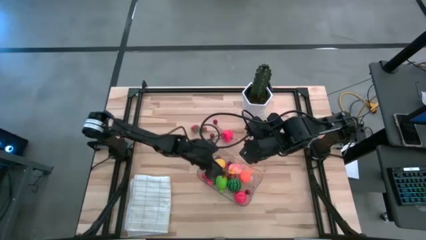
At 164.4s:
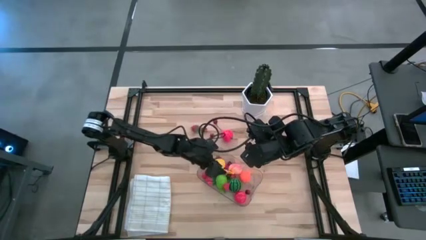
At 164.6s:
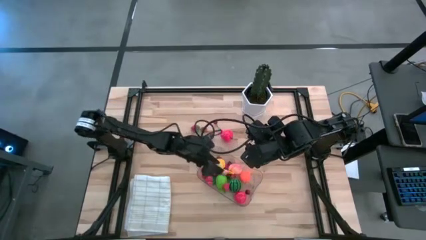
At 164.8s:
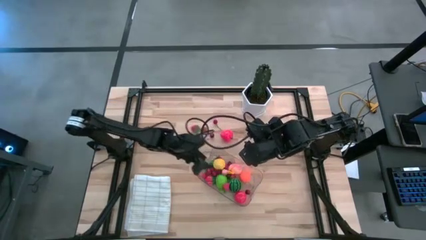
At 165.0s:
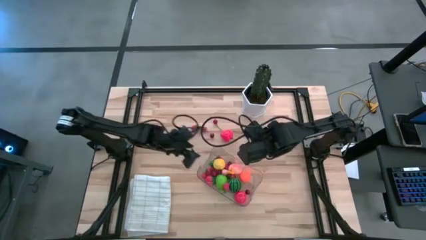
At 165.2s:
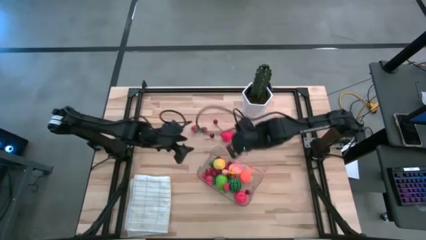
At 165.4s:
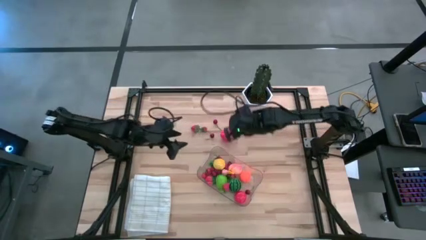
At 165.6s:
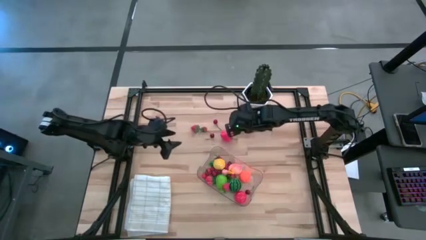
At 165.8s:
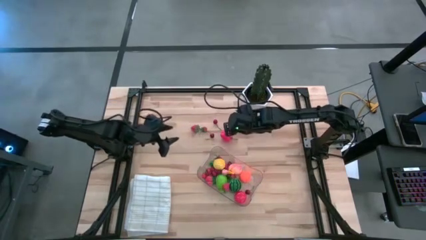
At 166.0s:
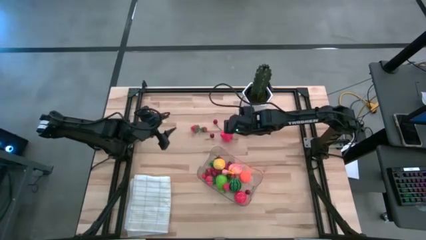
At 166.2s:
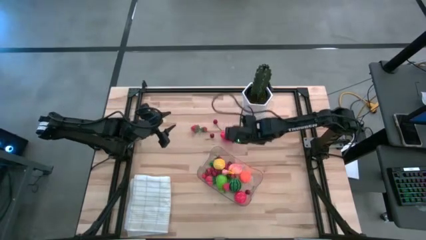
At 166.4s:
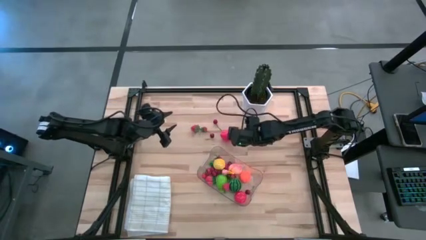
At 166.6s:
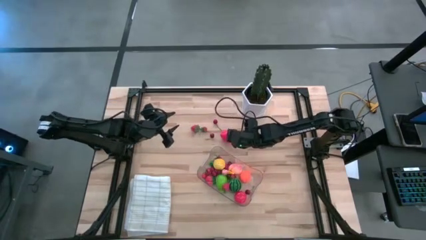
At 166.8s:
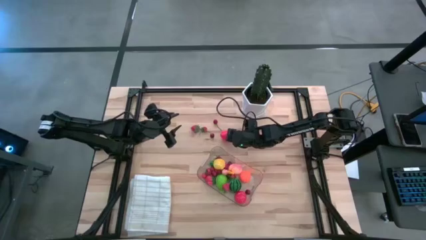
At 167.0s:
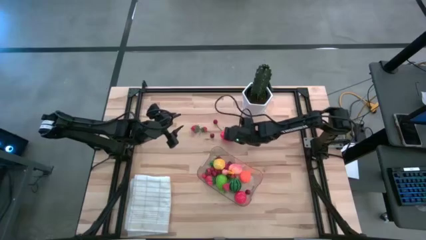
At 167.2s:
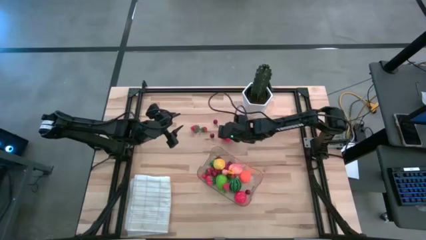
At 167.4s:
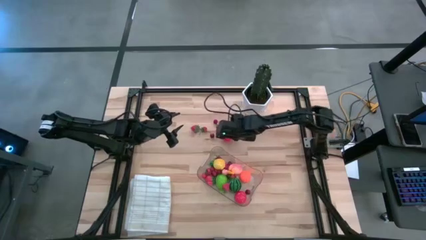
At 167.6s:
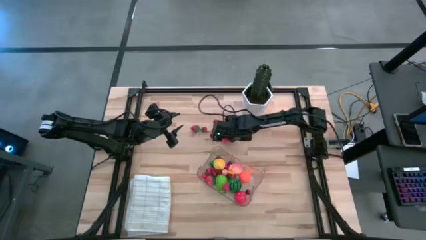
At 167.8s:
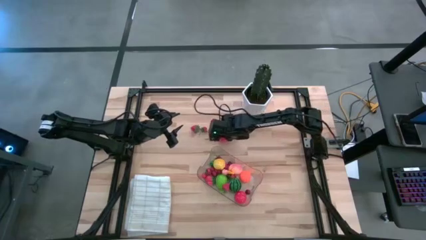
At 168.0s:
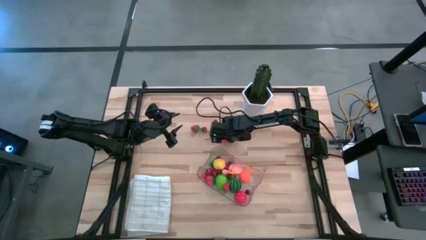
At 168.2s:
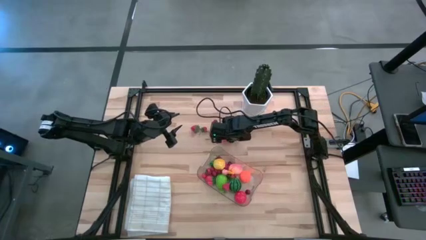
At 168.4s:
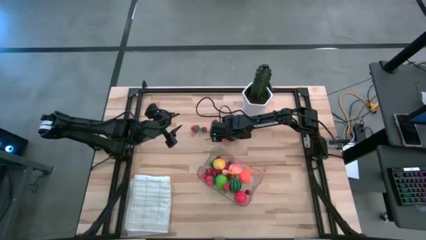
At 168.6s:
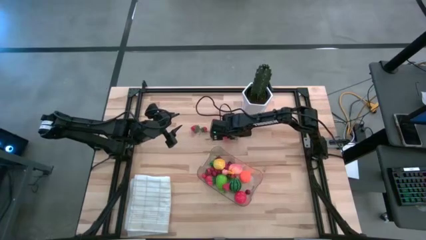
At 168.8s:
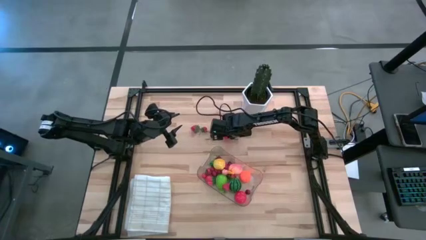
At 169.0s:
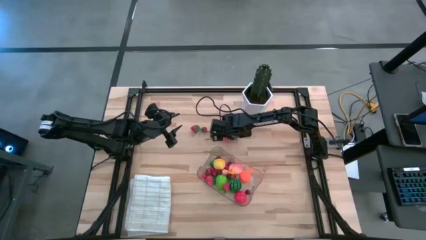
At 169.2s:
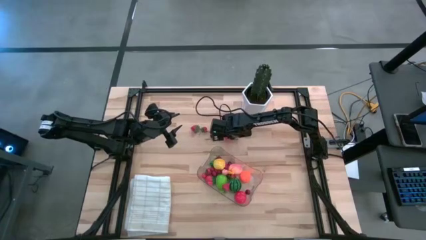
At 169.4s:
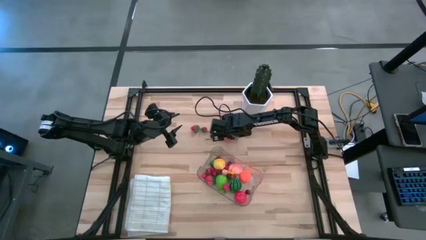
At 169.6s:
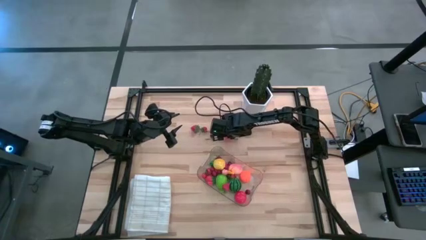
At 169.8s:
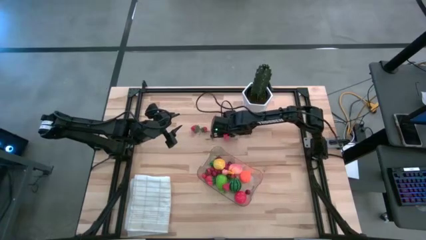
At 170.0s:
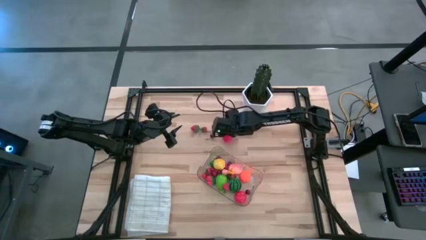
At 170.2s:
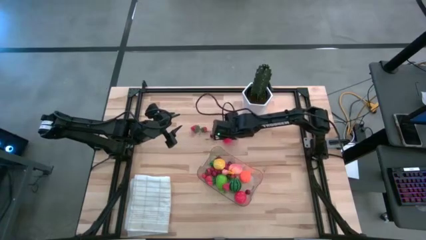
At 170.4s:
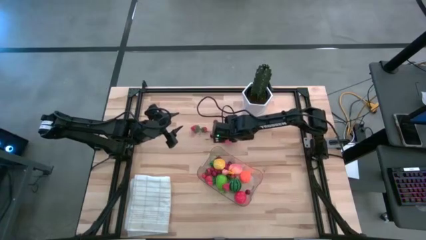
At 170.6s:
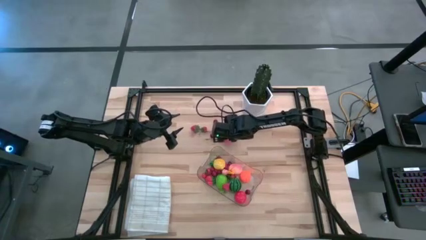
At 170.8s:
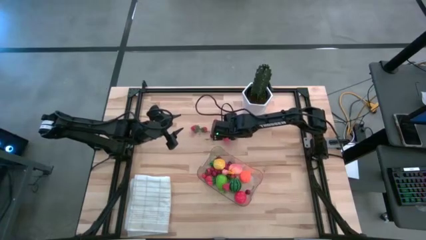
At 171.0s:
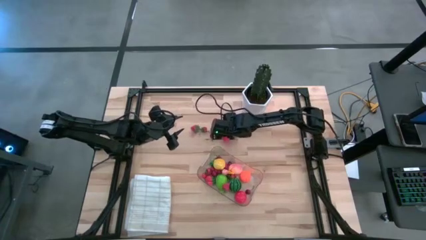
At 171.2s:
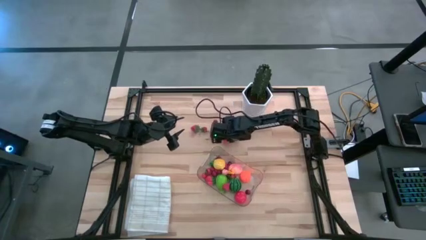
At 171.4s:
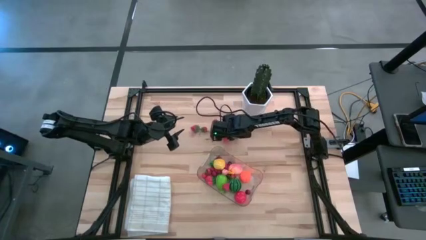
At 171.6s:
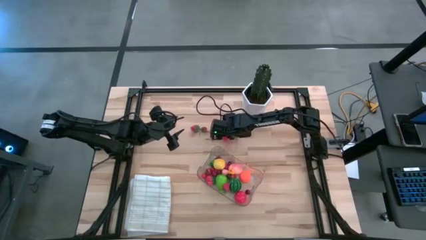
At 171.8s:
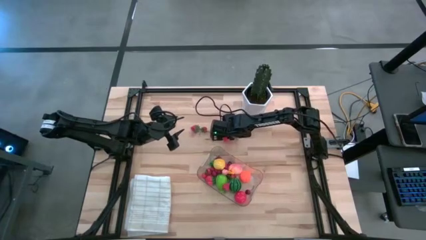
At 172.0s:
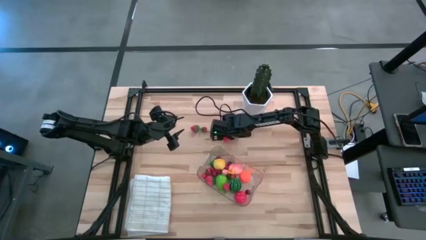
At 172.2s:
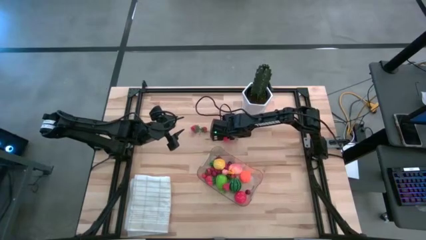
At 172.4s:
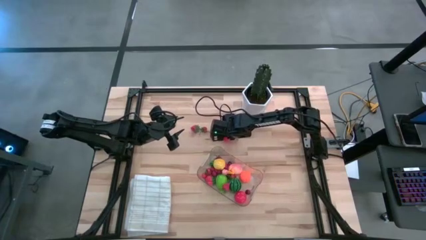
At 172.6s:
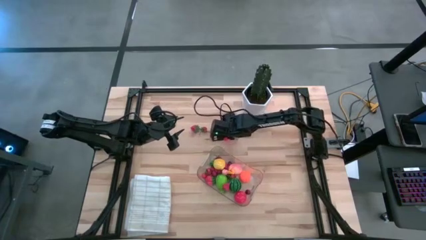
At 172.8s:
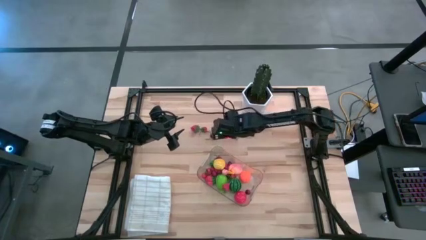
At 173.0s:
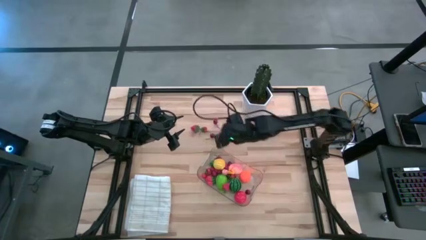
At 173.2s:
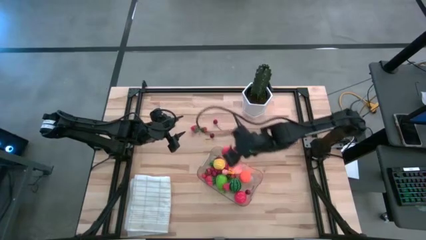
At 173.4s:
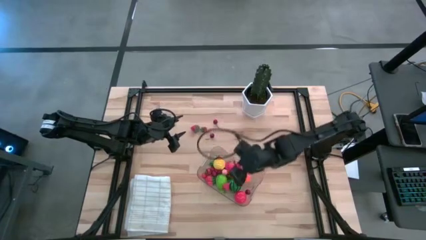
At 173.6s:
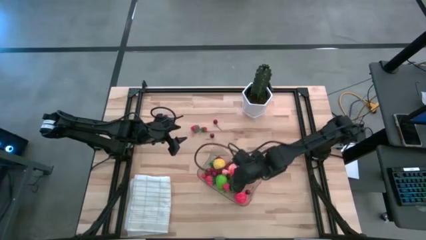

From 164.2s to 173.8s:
Task: Pick and placing Produce into tupperware
Put the red apple into the transparent bin

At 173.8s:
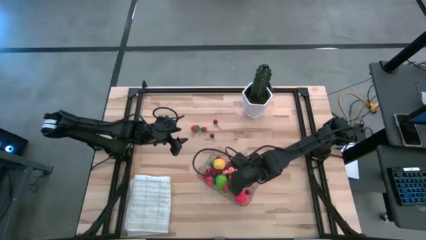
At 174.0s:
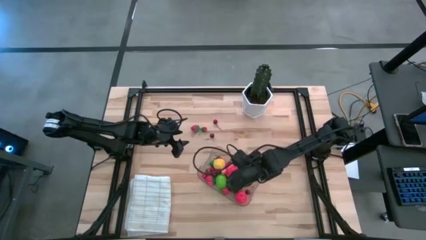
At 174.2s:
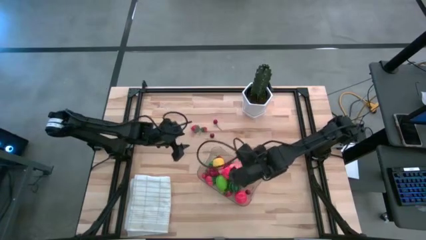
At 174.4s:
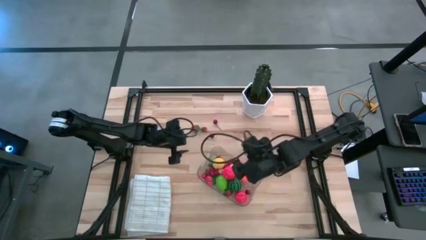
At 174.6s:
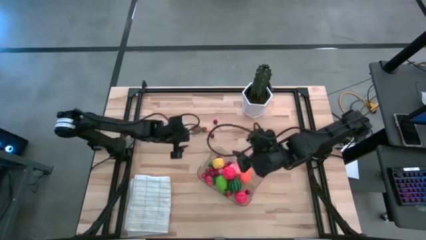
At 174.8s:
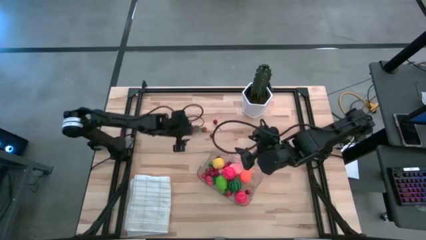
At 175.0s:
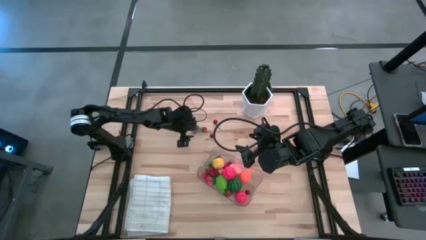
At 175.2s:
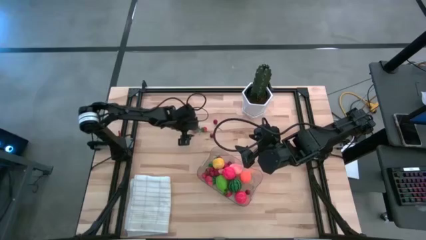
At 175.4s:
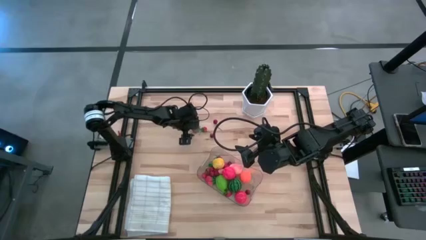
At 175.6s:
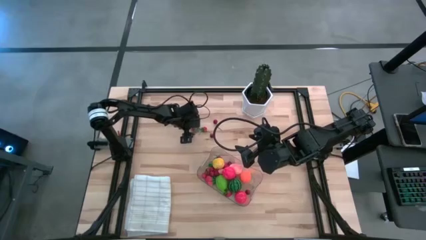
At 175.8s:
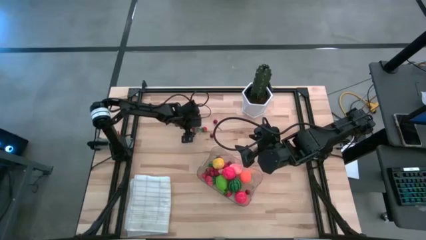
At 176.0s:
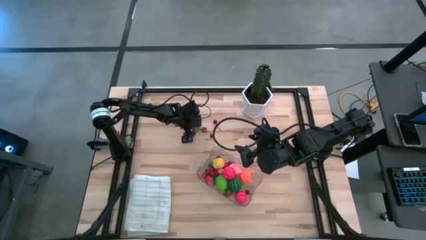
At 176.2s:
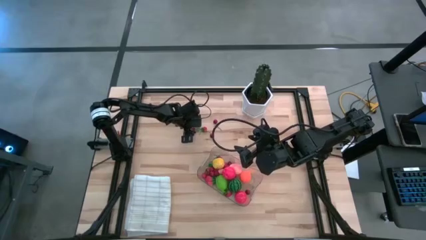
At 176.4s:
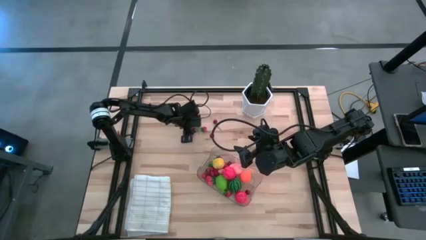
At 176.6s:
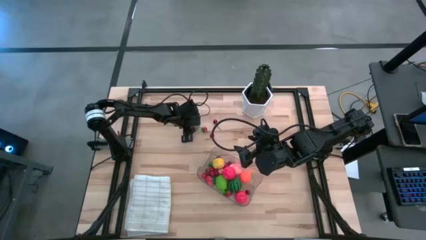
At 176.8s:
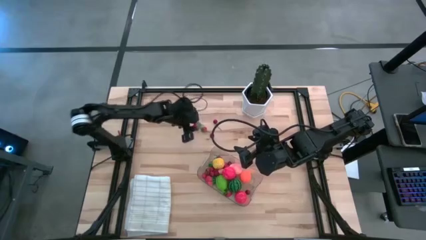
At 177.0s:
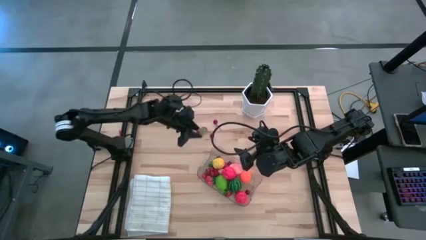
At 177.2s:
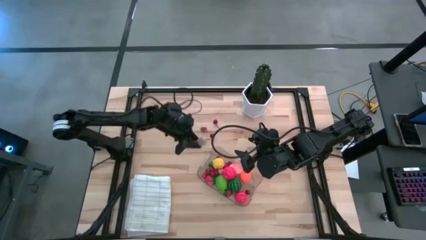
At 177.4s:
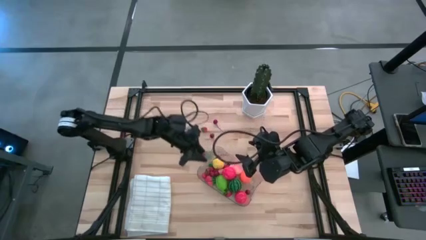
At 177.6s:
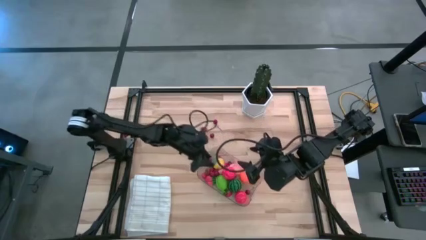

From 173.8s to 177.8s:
Put the red strawberry into the transparent bin

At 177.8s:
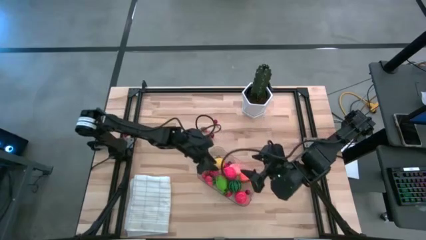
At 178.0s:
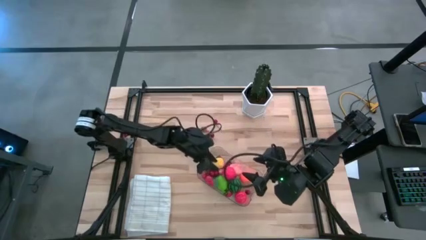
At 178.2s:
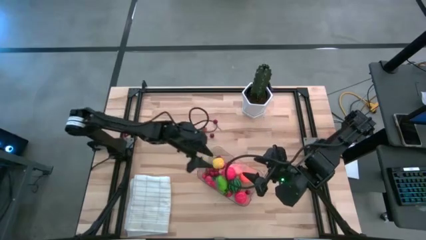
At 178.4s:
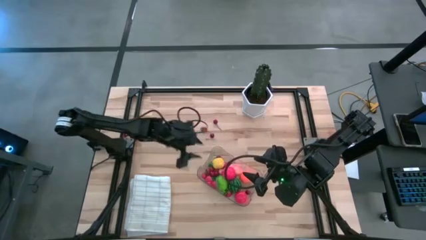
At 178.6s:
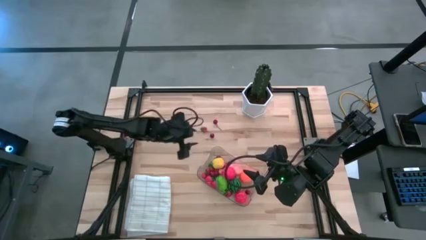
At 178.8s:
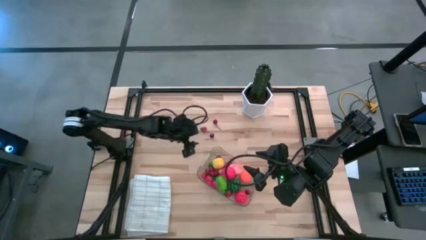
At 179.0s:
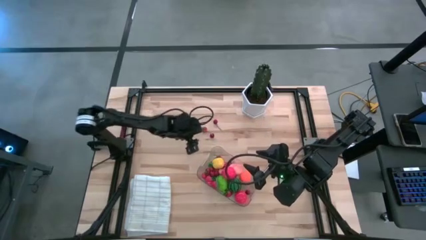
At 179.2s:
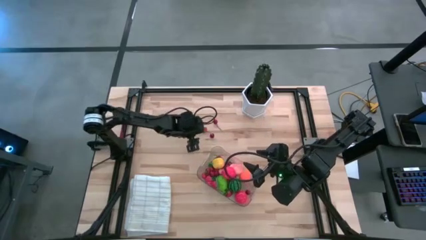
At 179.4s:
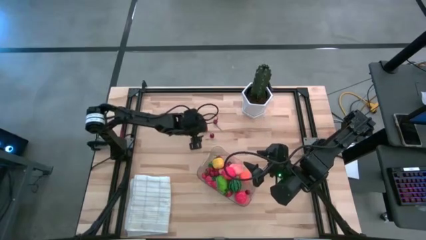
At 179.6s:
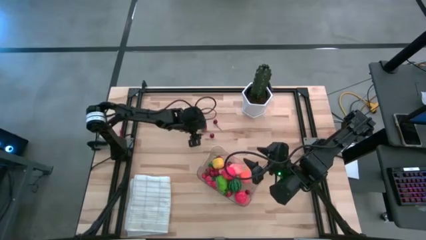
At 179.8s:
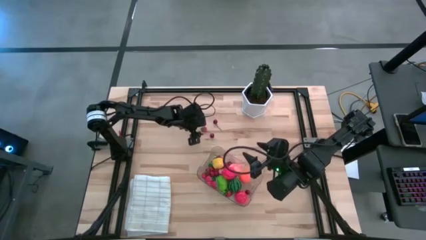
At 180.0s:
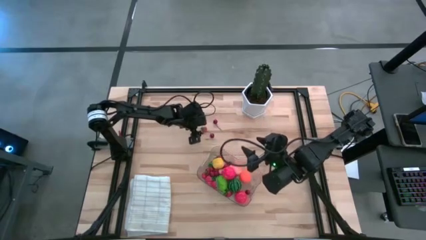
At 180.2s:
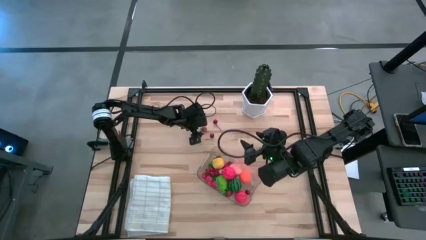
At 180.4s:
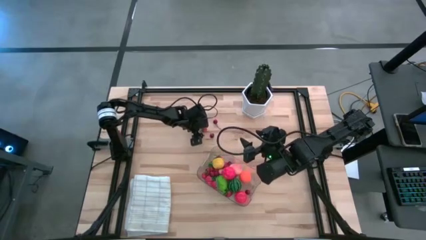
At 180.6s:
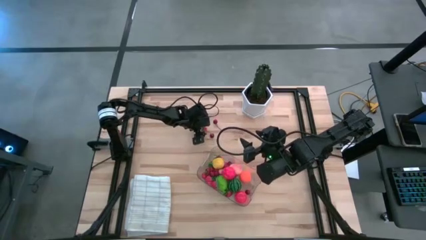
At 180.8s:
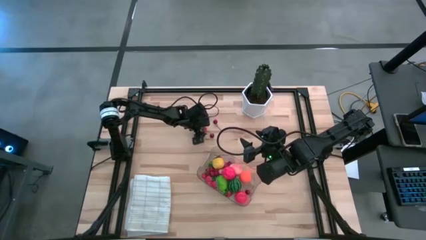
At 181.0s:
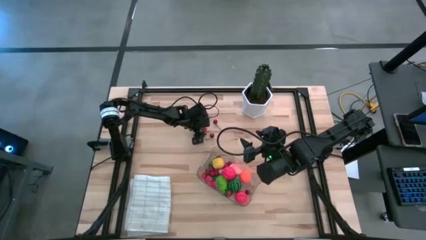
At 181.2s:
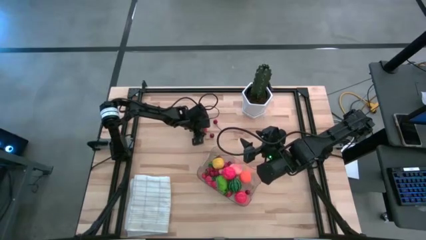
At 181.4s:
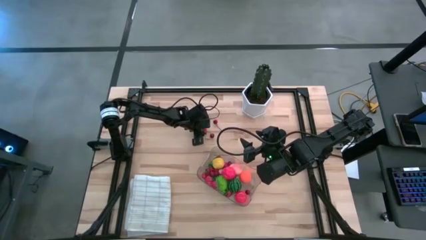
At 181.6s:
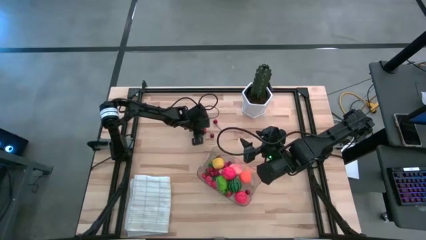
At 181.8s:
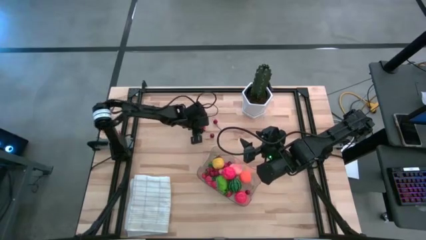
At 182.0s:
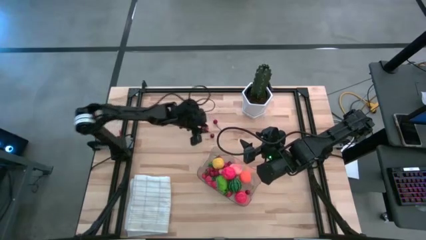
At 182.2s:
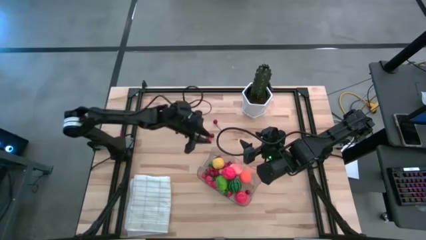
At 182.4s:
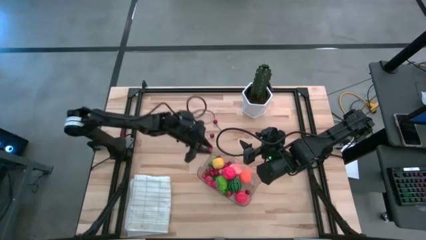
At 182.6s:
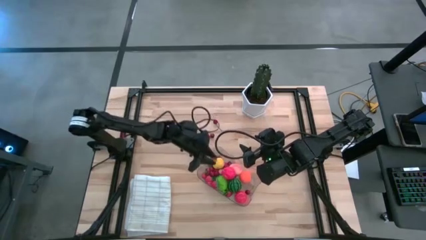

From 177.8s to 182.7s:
Put the red strawberry into the transparent bin
